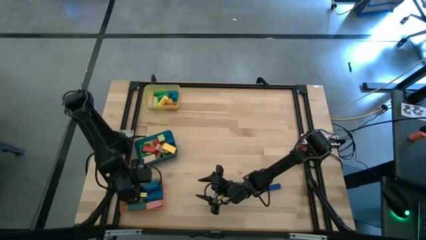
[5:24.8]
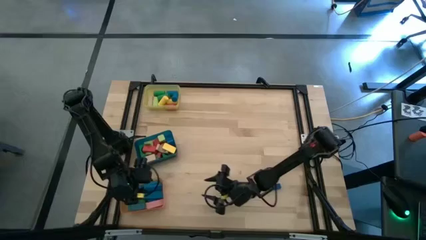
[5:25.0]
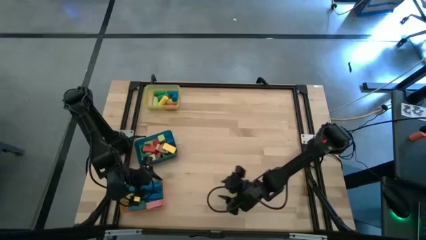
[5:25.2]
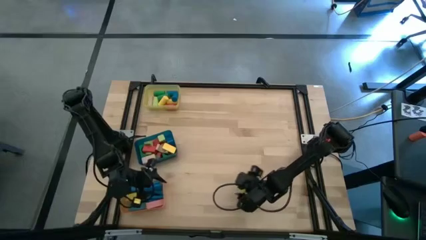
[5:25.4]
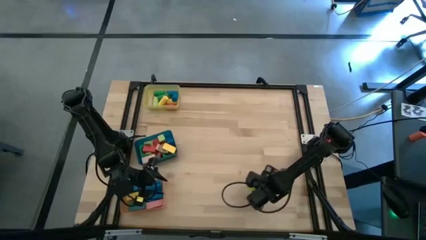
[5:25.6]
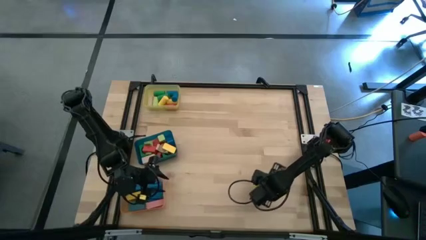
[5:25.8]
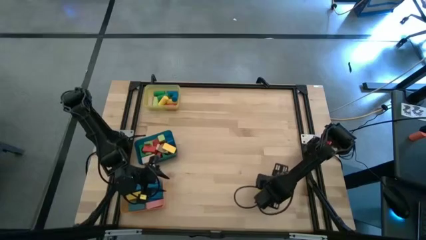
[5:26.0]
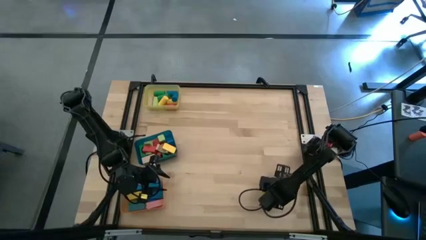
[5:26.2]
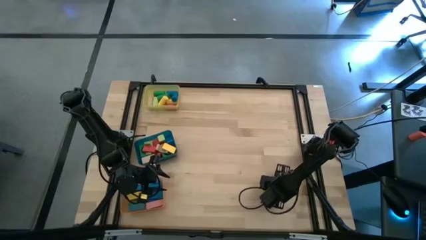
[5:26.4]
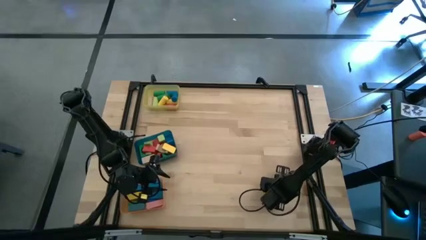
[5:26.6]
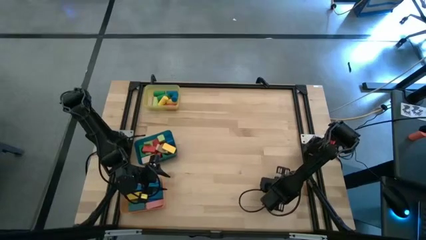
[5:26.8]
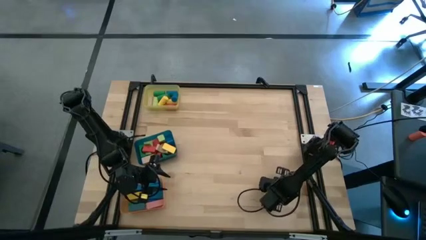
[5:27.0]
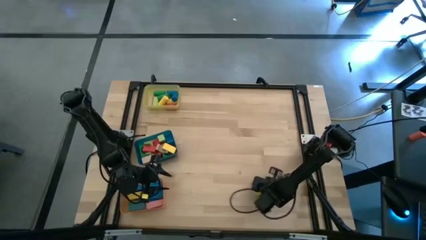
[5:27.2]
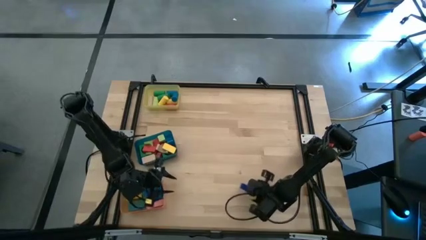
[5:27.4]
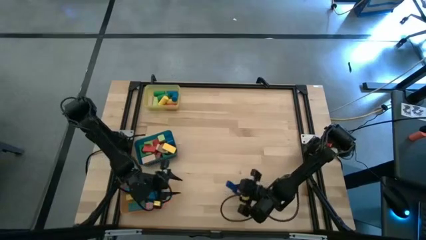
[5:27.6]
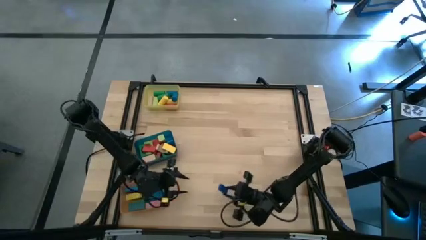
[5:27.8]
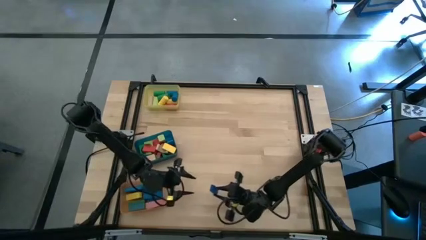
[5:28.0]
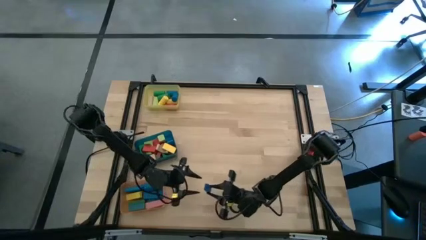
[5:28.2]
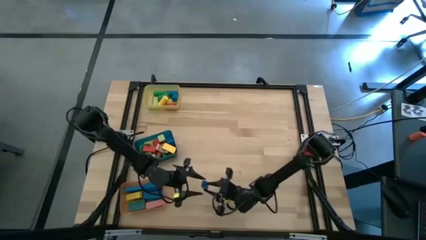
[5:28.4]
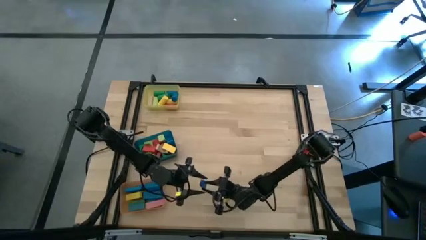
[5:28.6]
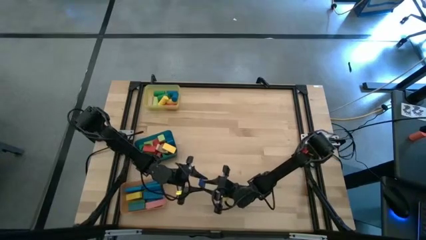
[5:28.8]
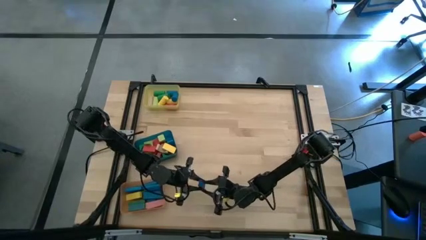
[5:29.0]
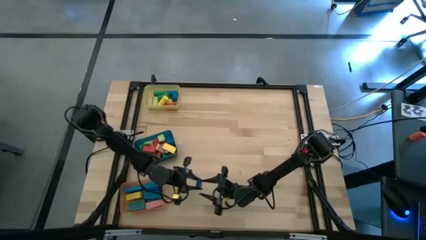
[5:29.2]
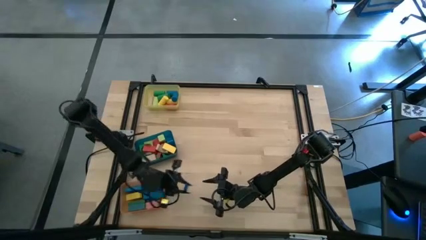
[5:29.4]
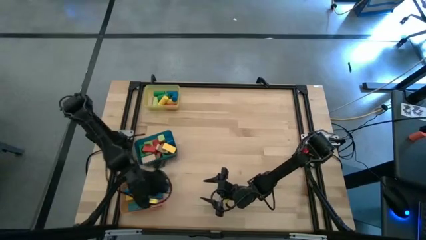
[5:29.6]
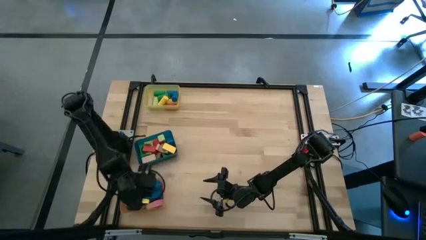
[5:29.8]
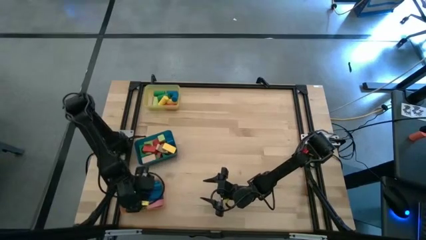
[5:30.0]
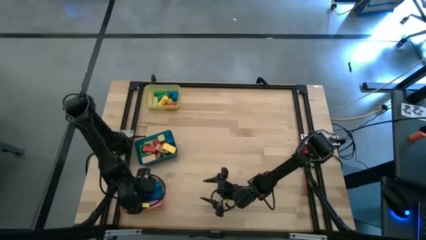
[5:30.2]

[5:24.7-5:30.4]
Task: Sort blocks by size
Put the blue block into the orange bin

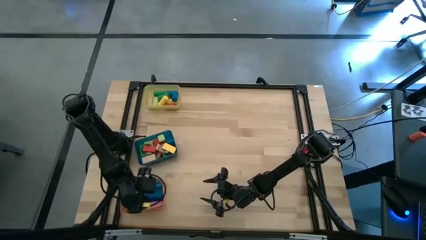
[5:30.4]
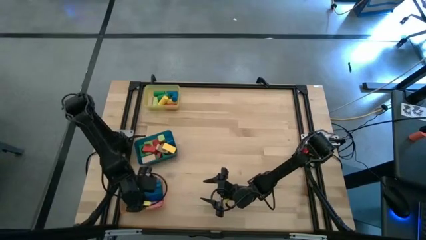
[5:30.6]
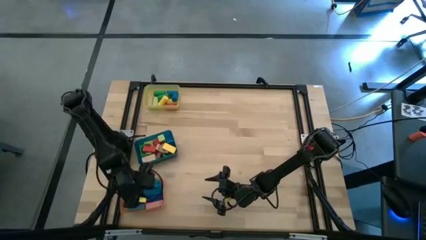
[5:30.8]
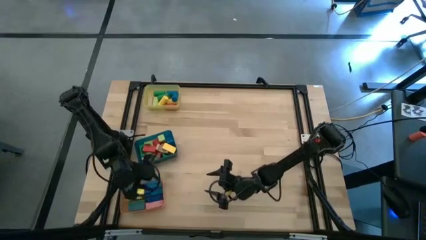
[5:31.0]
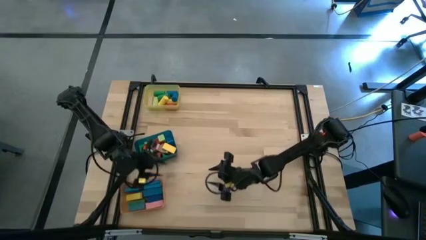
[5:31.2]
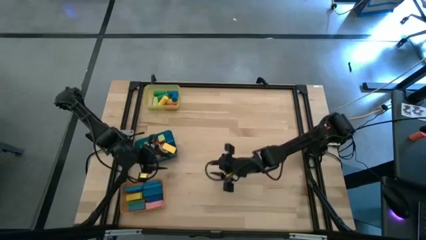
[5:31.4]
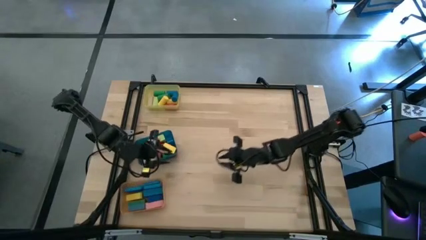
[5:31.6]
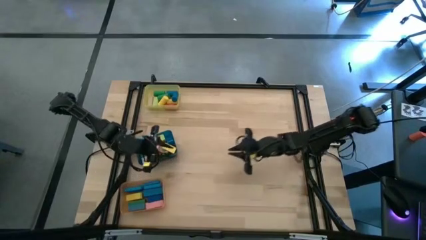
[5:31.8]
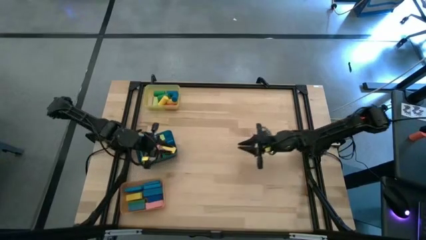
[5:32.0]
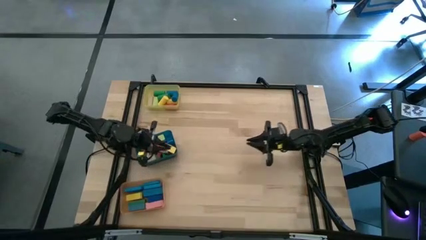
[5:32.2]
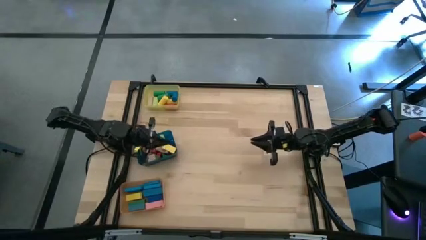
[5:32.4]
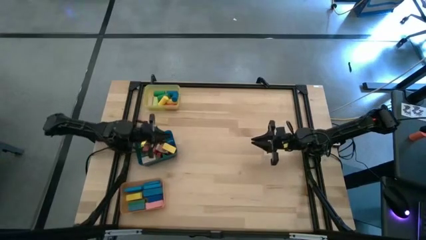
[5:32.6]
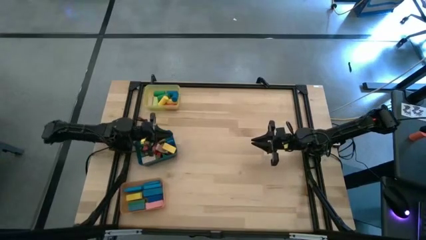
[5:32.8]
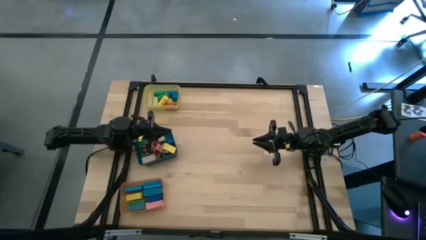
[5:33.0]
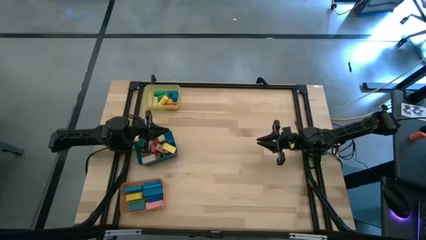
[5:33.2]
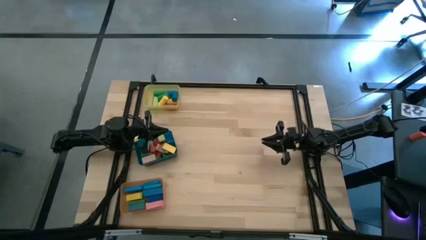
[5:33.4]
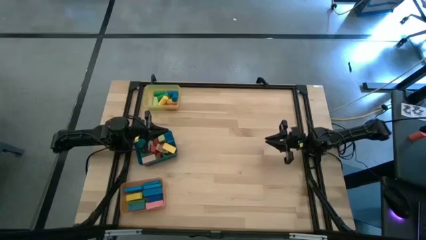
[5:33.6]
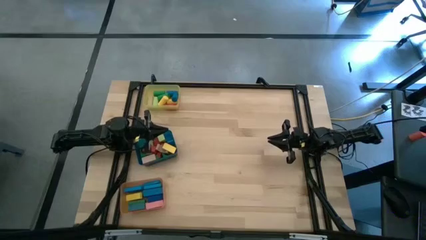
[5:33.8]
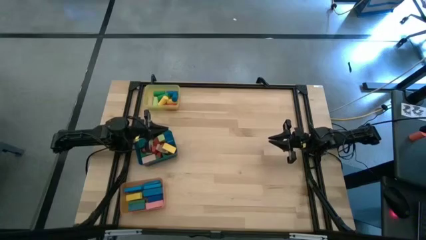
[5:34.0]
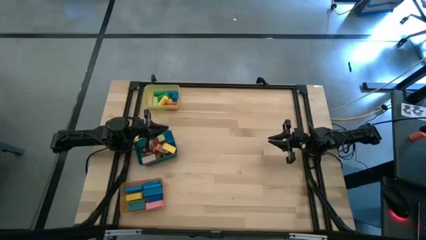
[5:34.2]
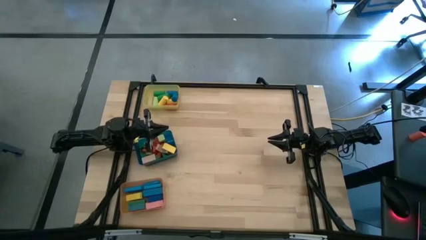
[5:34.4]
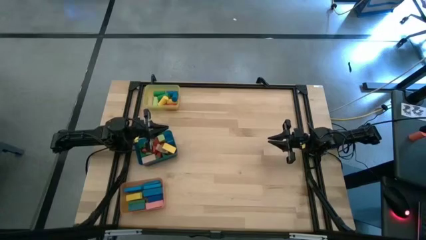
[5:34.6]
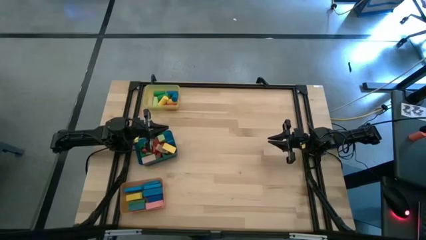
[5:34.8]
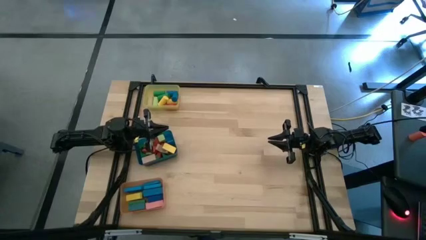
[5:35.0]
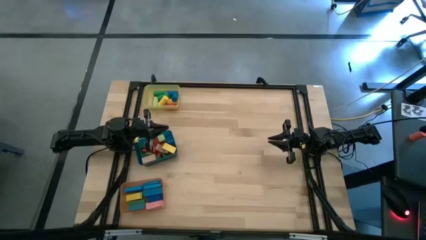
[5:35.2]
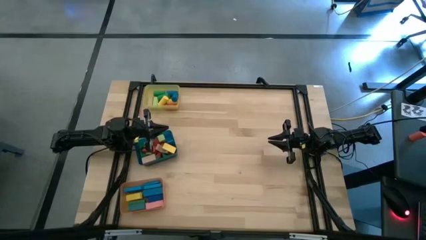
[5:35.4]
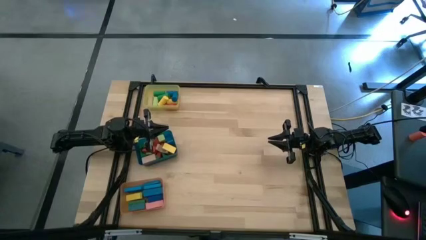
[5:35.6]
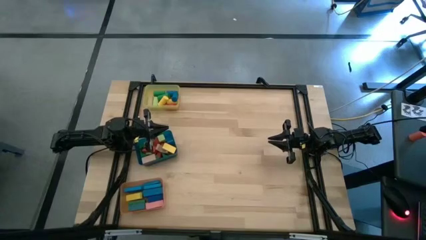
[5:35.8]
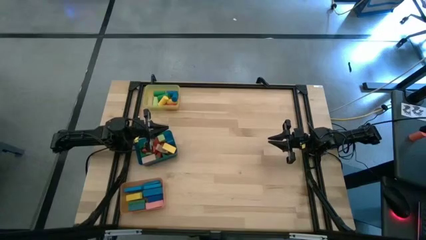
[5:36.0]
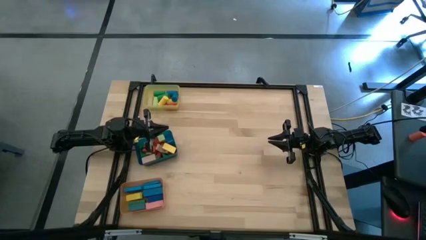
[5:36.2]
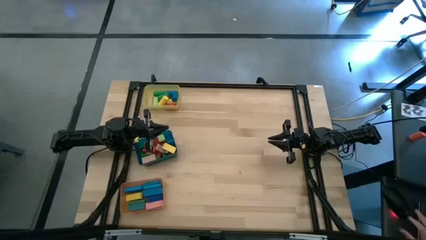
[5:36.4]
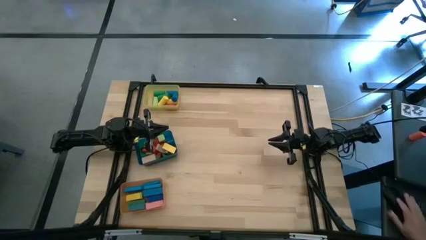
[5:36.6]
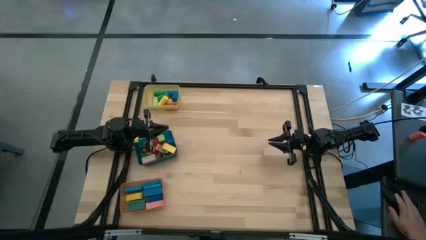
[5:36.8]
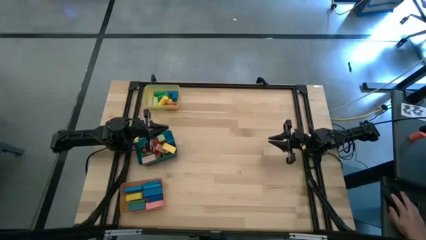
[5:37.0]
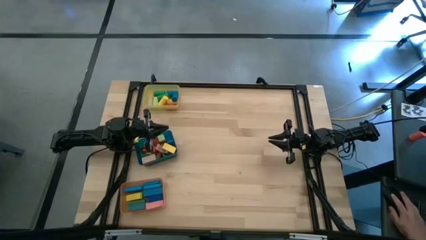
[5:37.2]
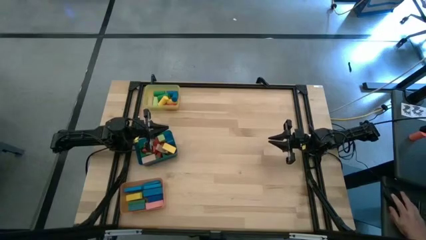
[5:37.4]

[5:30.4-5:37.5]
Return to Home Position

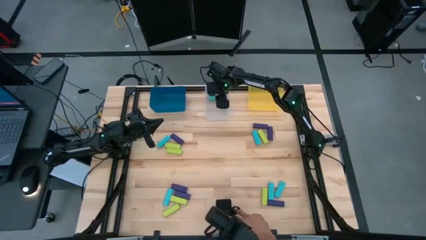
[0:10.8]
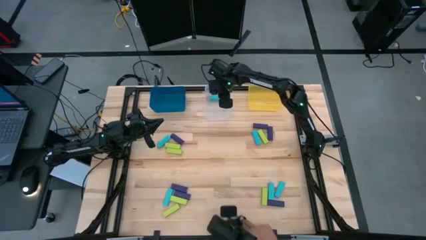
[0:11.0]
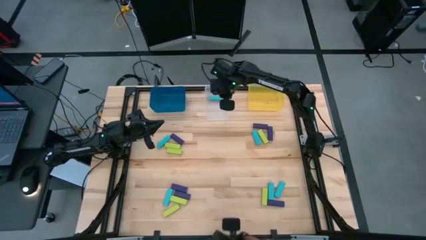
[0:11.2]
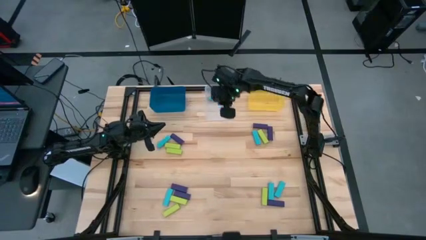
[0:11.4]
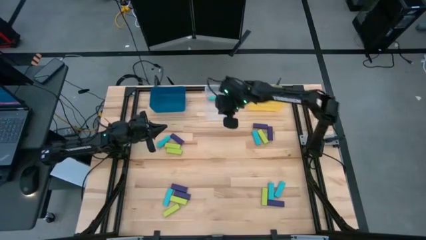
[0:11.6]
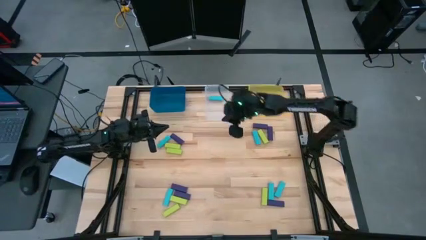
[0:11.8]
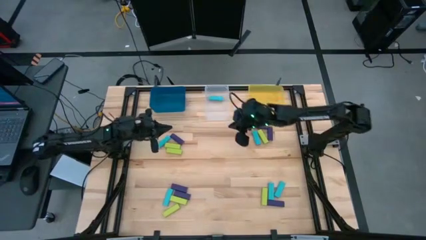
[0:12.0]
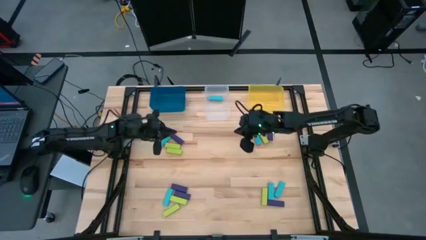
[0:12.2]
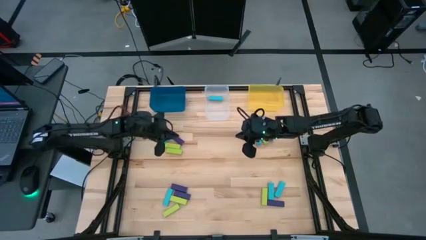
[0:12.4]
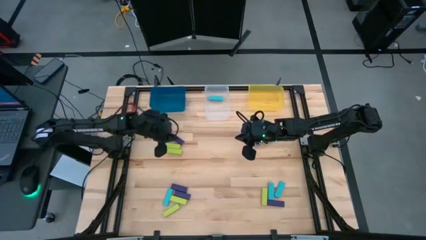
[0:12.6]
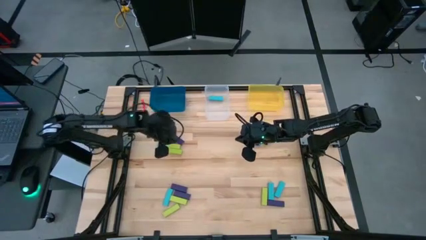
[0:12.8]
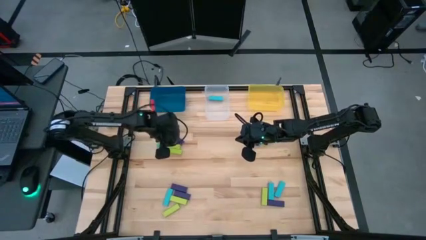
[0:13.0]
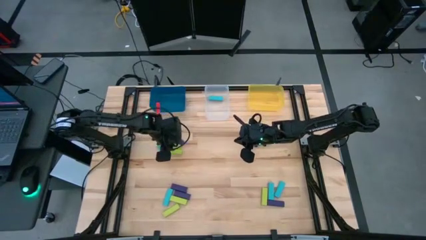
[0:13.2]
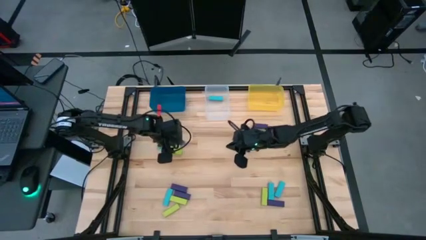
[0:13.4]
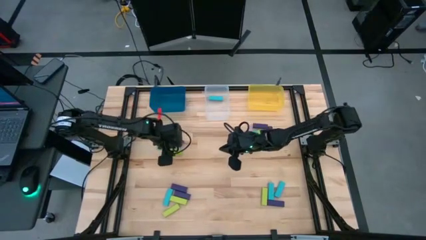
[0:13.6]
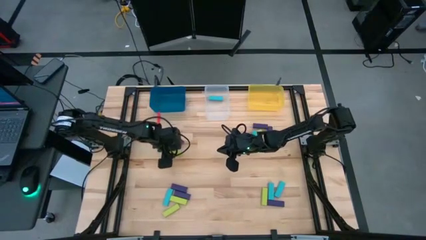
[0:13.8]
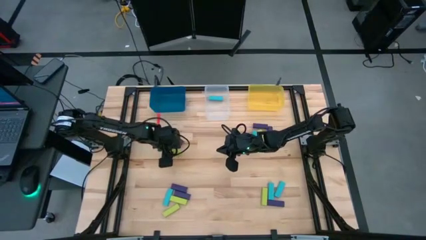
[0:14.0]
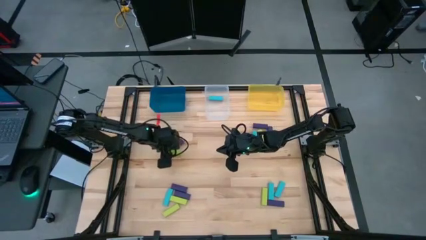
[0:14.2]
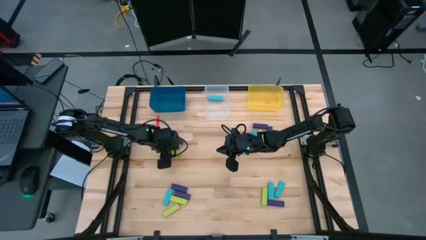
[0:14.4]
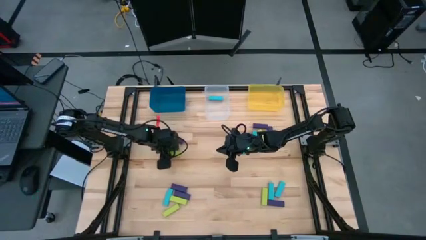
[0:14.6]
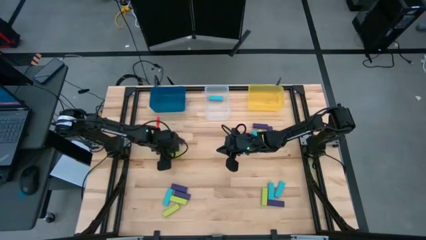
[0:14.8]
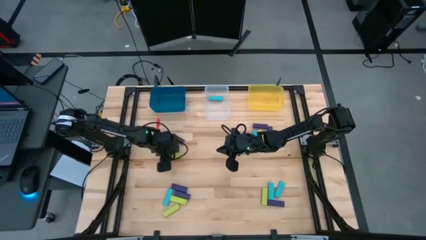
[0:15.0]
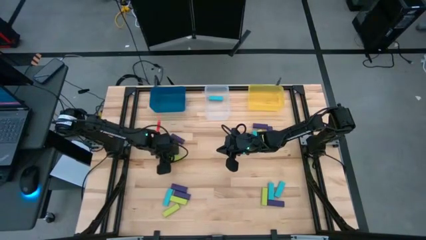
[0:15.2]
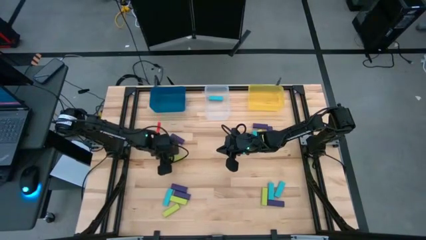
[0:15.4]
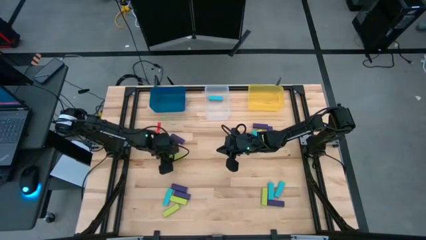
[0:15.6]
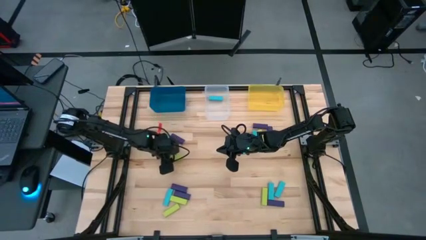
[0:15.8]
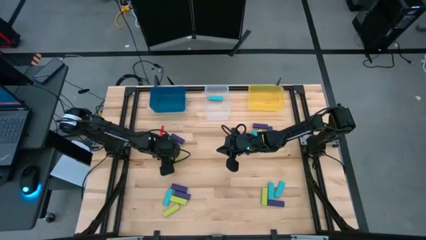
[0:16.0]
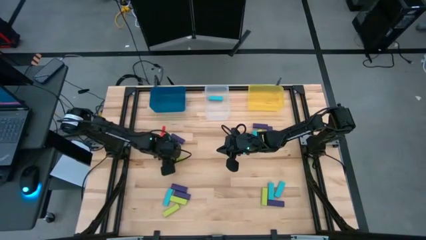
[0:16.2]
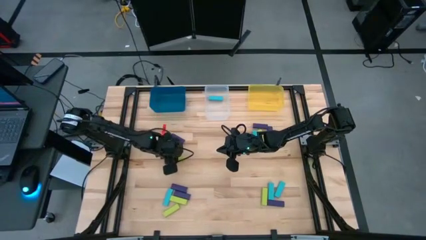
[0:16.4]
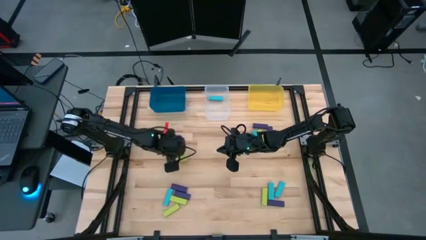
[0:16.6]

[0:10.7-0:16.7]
Task: Sort blocks
Put the green block into the blue bin
